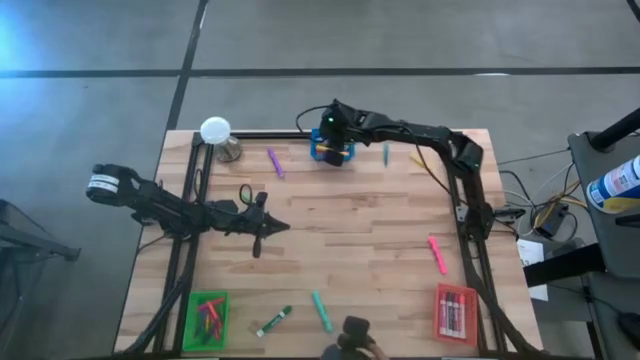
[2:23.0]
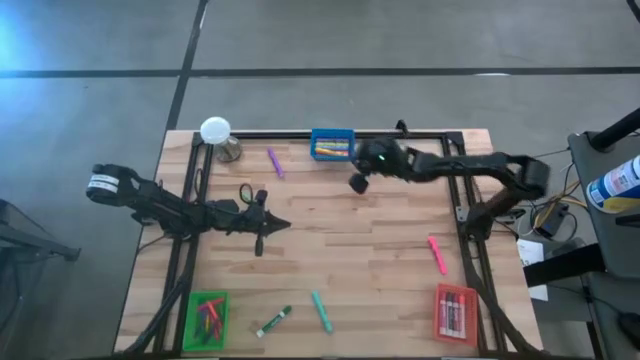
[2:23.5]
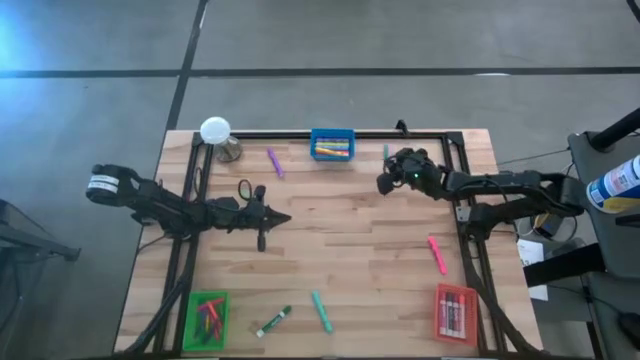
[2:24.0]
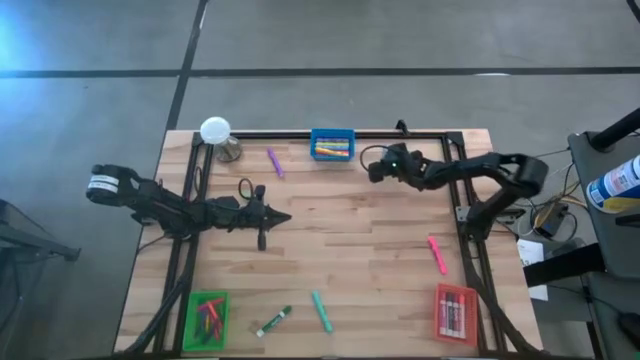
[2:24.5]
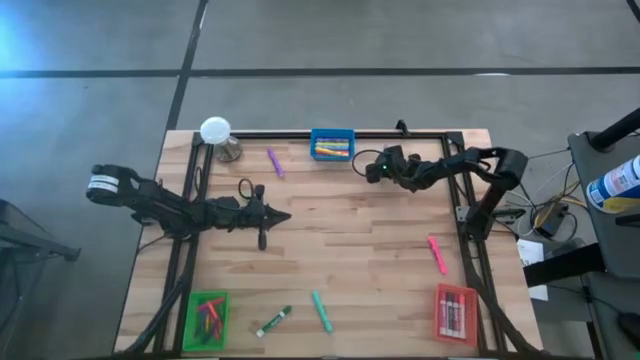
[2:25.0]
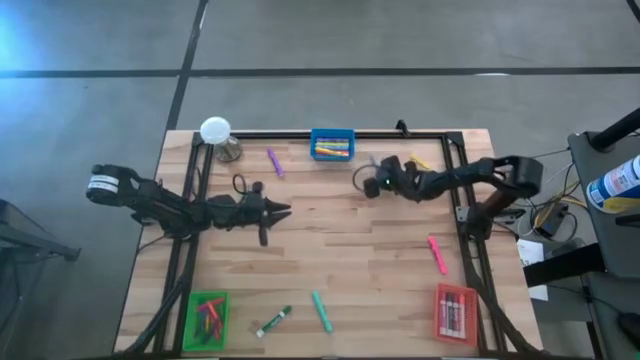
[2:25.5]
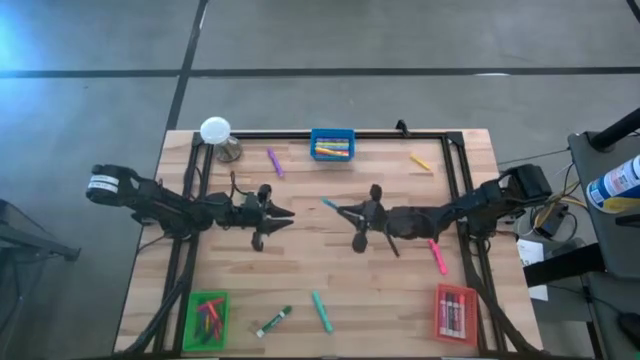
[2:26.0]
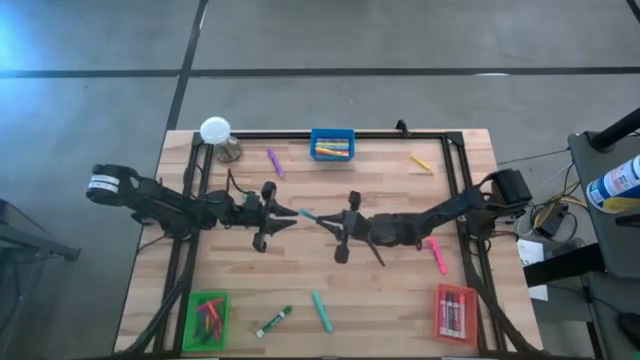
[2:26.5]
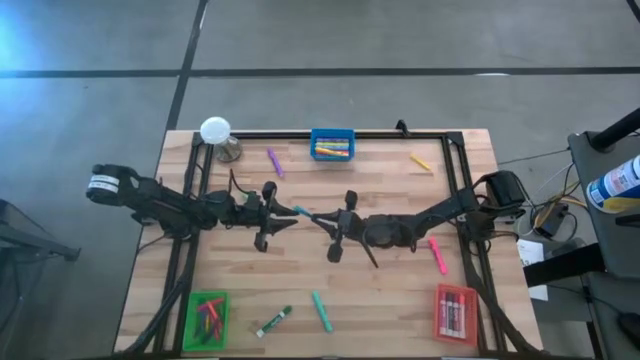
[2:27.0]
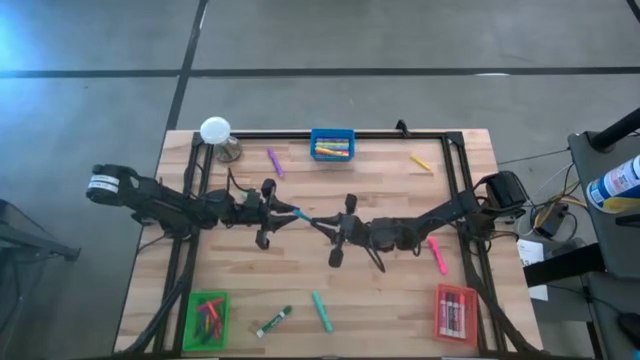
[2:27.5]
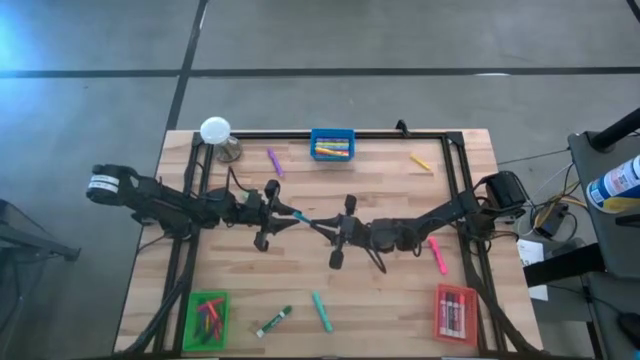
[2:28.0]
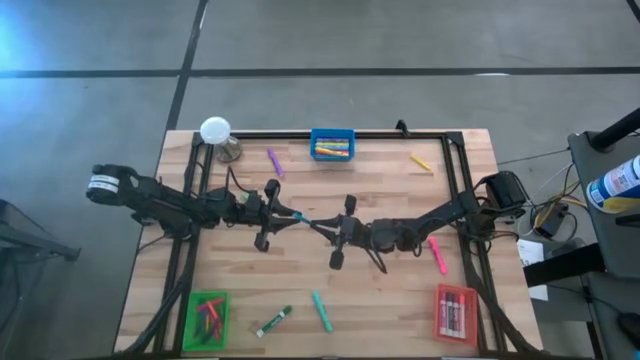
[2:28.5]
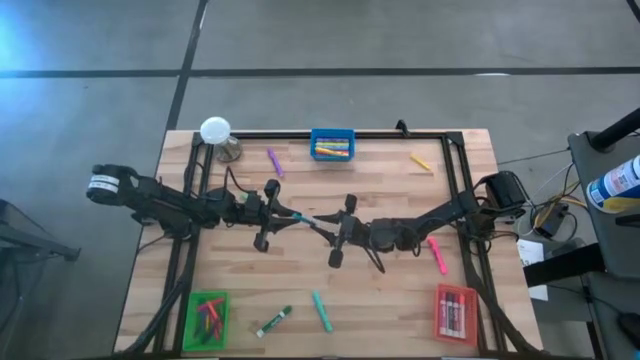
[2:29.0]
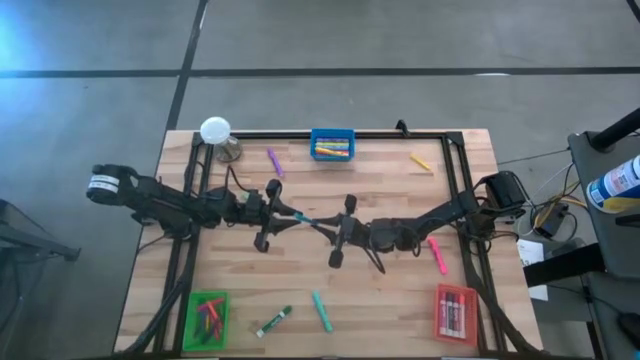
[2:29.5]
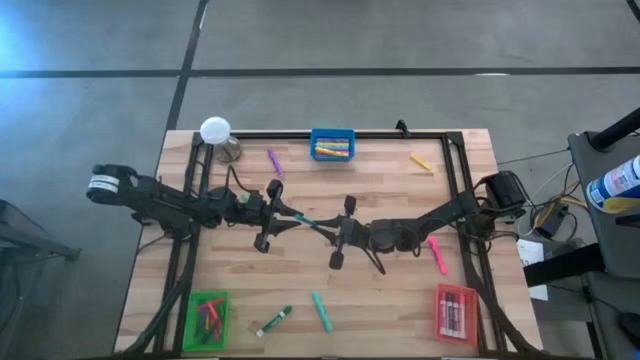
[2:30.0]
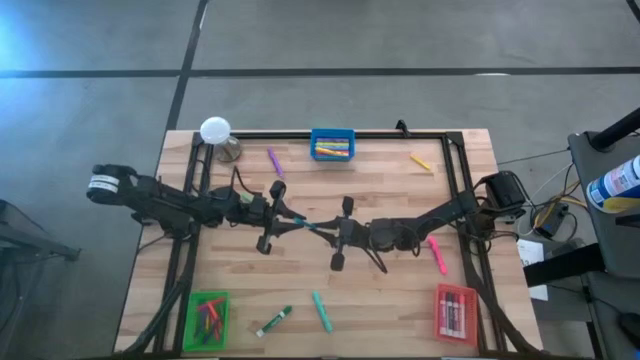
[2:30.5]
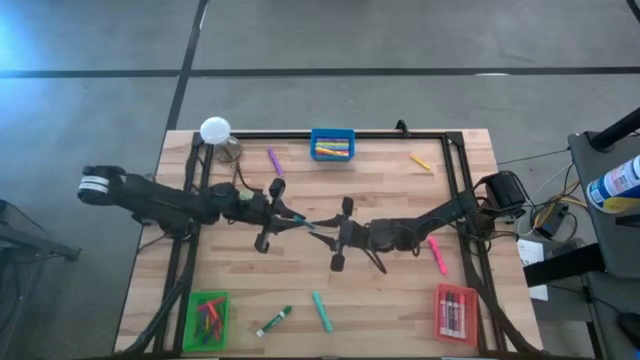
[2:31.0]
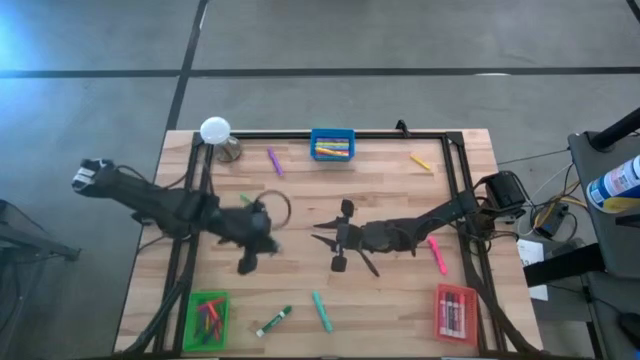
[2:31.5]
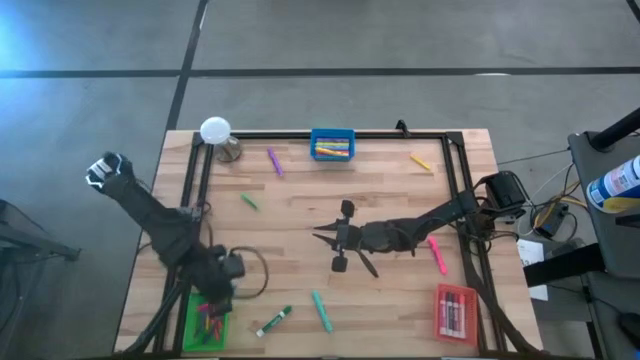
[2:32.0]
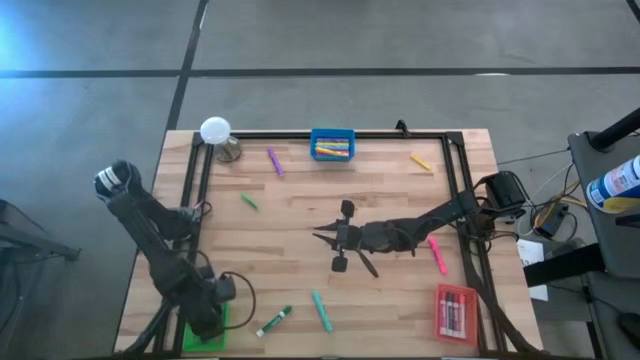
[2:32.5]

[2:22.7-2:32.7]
Task: Pick & Place Markers
Put the blue pen into the green bin

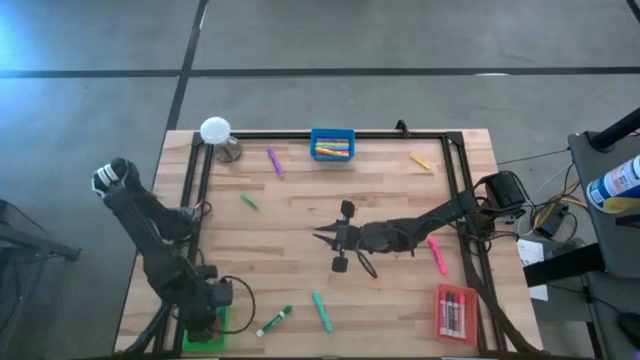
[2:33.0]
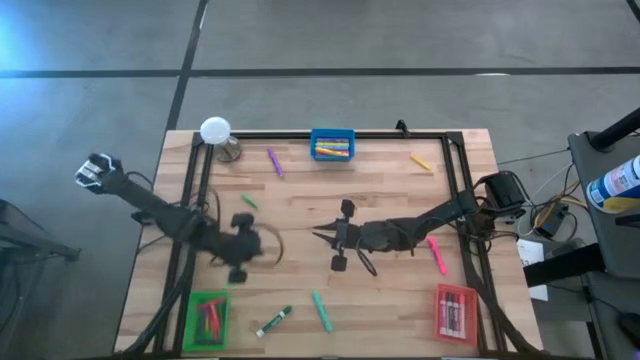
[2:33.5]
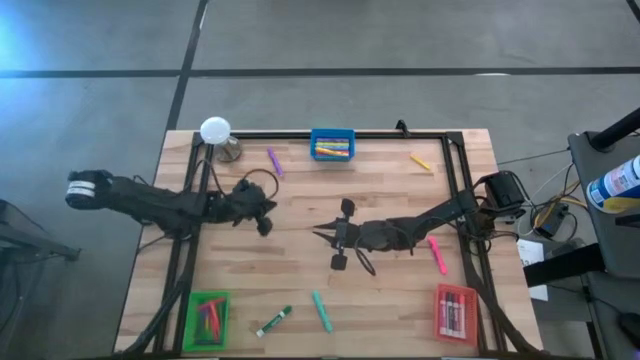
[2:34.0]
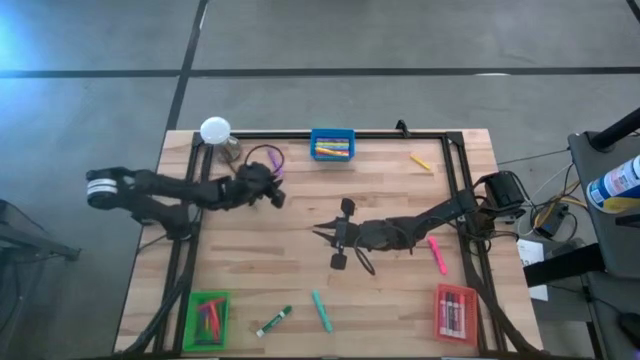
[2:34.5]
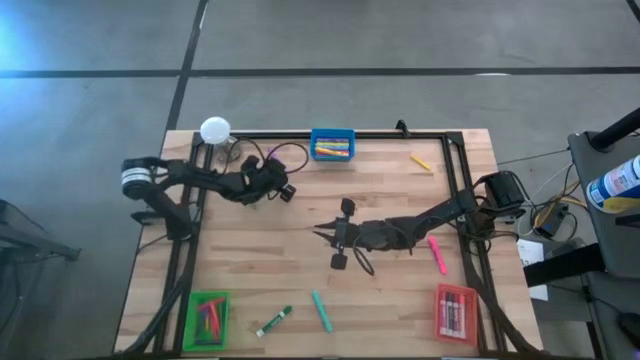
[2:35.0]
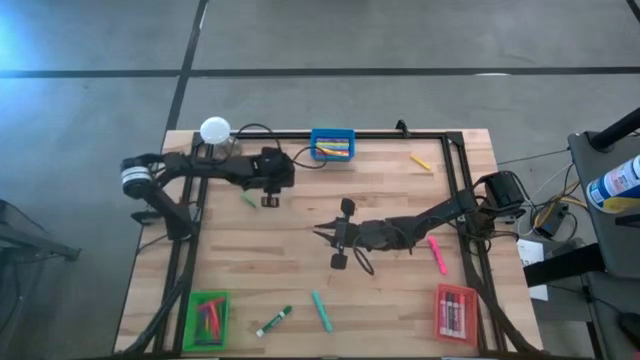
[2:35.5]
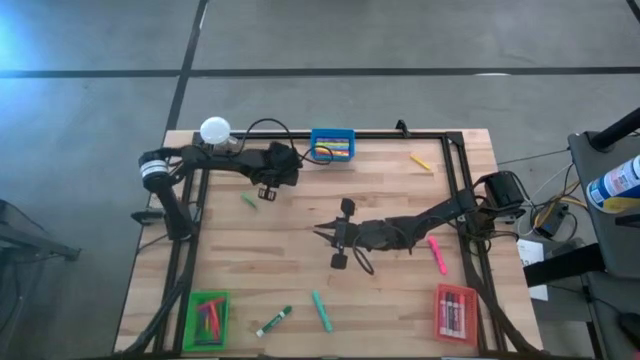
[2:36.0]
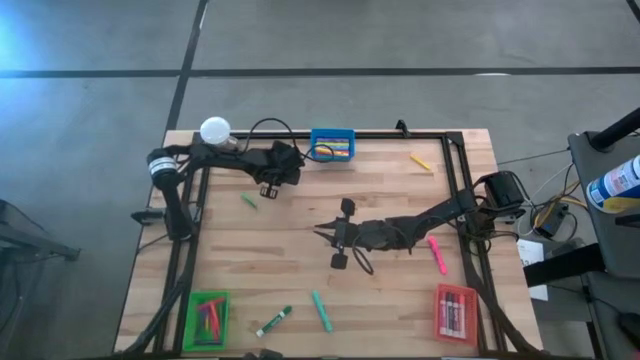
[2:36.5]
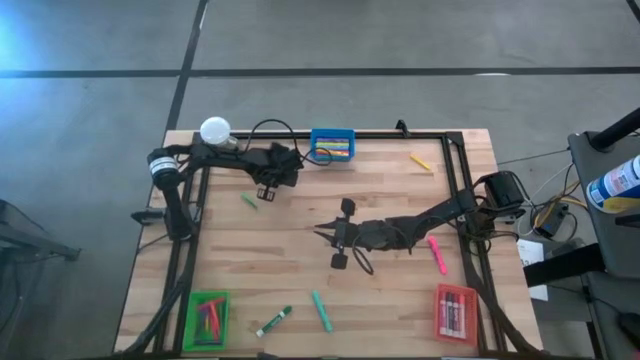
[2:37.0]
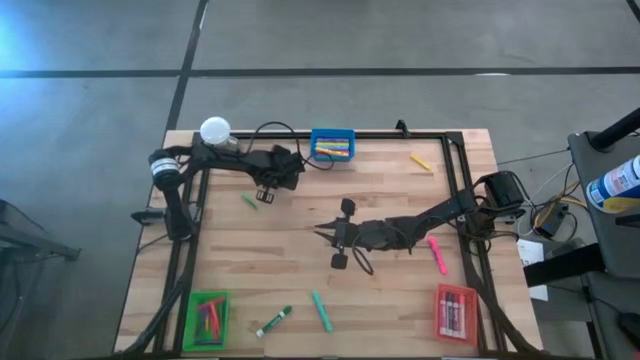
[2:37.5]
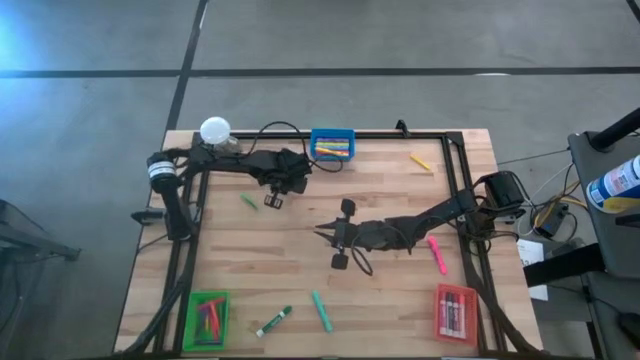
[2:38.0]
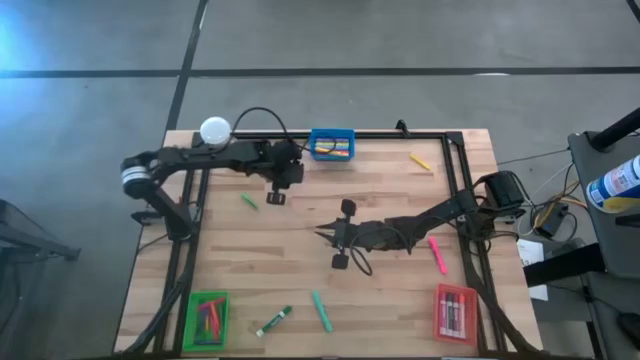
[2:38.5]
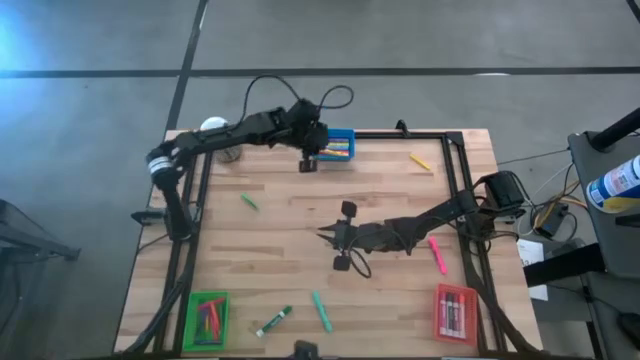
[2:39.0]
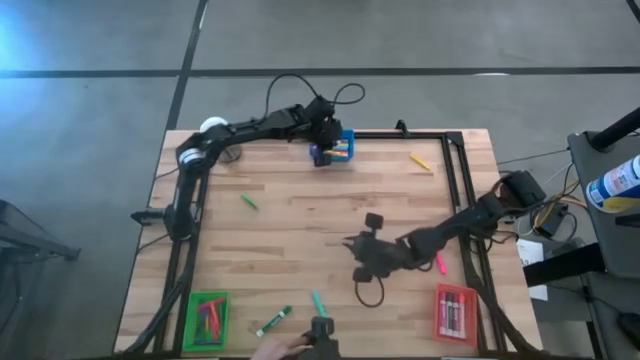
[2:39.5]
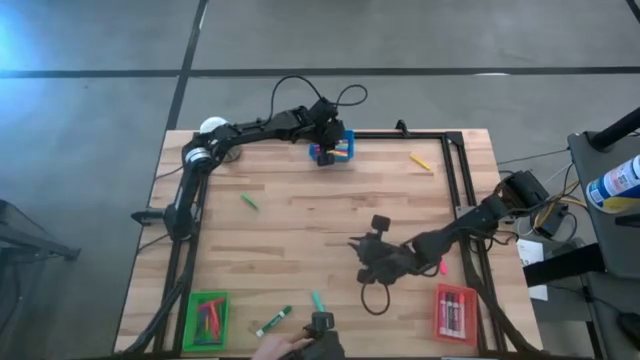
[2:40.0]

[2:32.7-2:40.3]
Put the violet highlighter into the blue bin

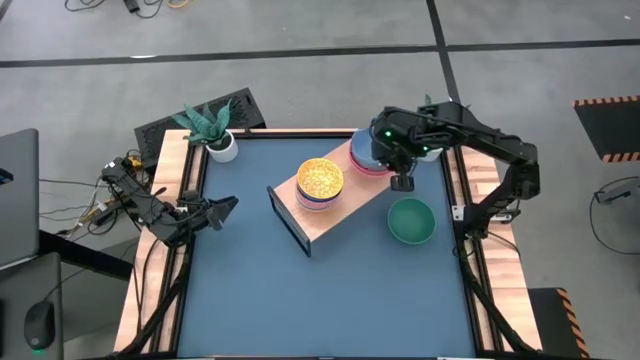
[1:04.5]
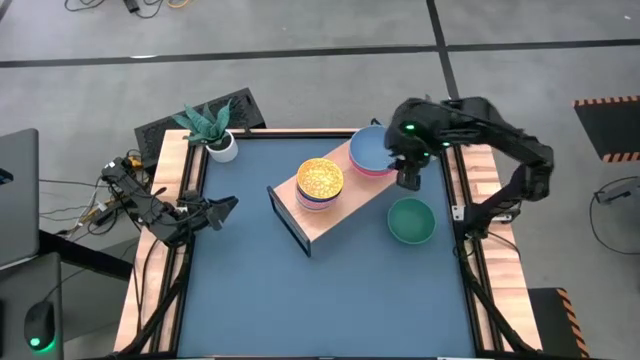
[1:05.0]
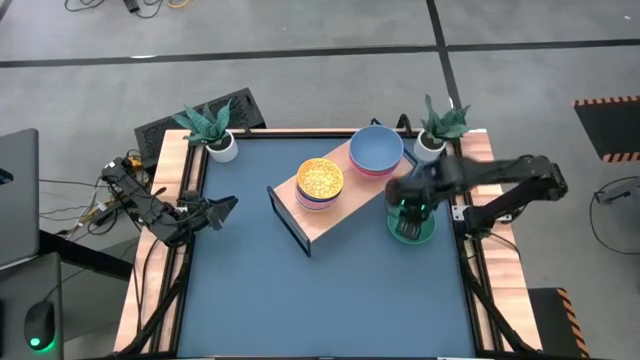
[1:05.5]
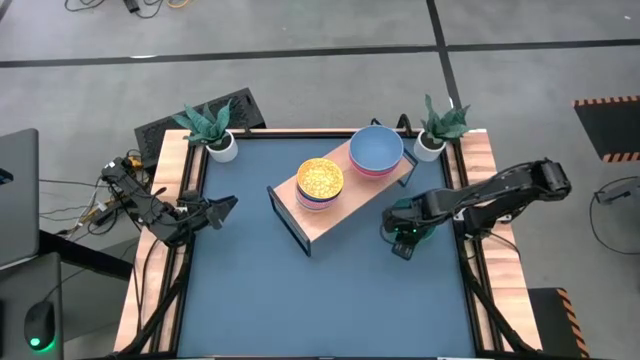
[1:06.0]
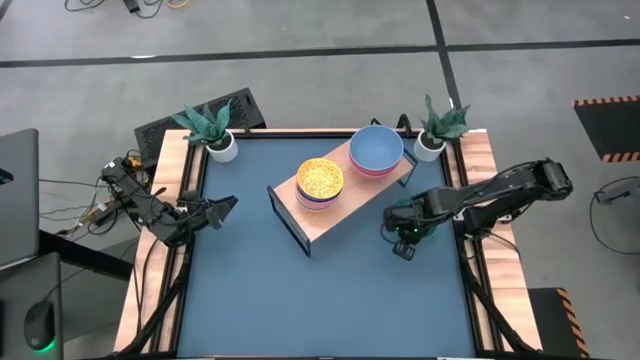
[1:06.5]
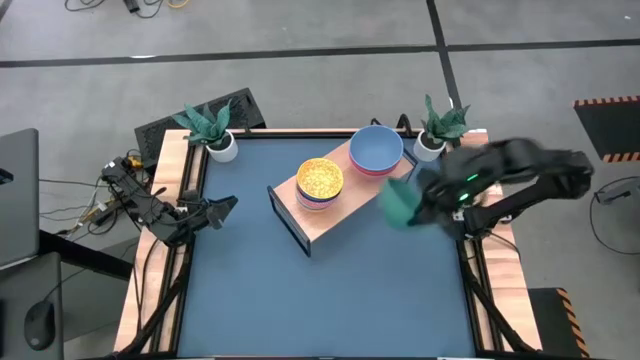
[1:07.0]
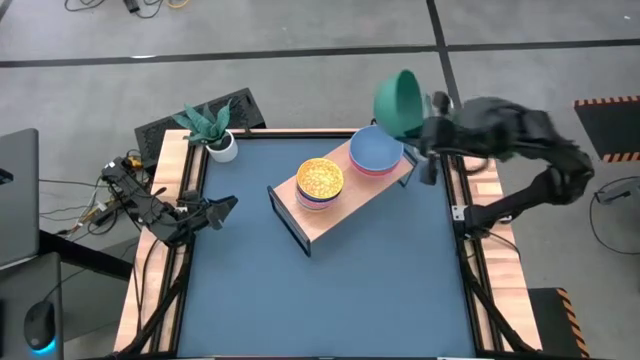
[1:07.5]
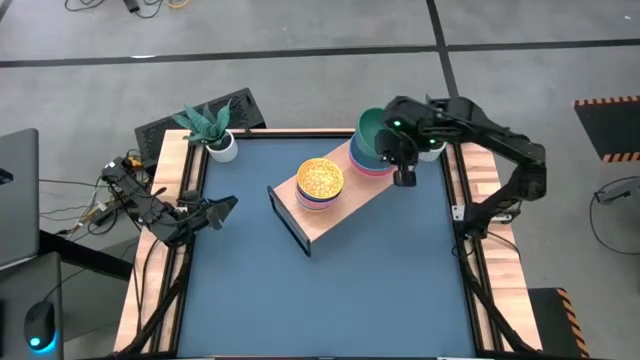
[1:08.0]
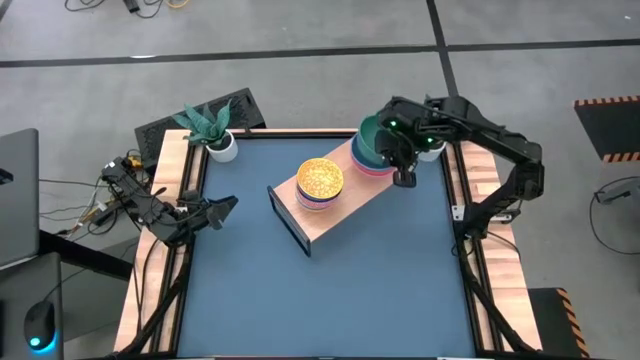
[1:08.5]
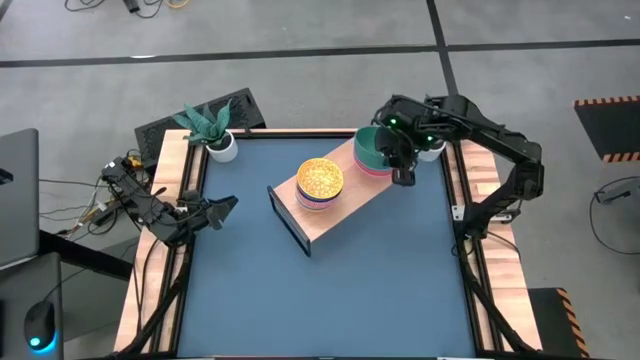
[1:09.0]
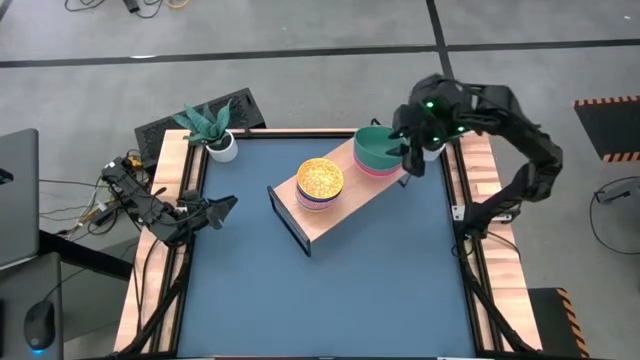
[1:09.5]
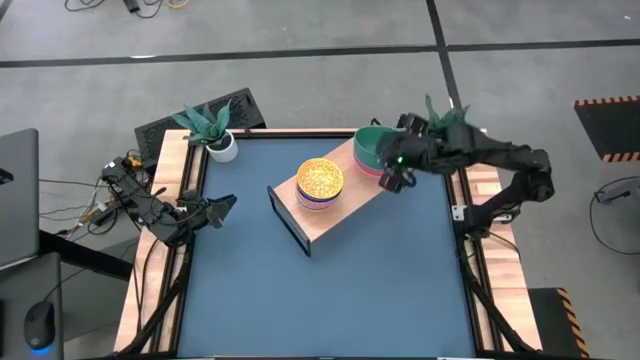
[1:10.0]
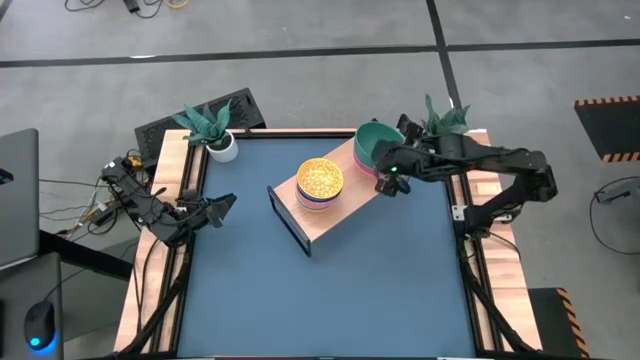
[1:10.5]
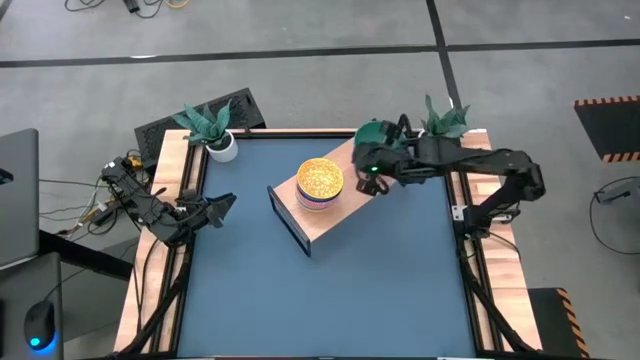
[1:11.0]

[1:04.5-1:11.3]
Task: Place and stack bowls onto a shelf
Stack the green bowl on top of the blue bowl on the shelf
